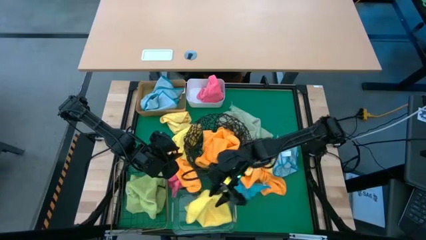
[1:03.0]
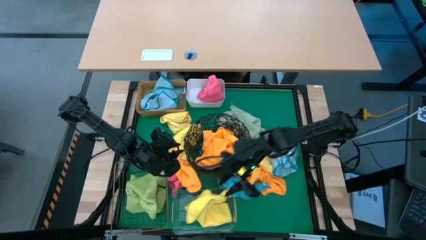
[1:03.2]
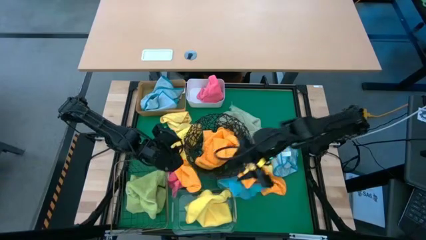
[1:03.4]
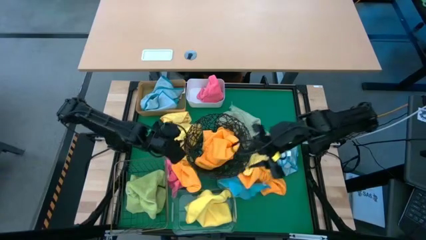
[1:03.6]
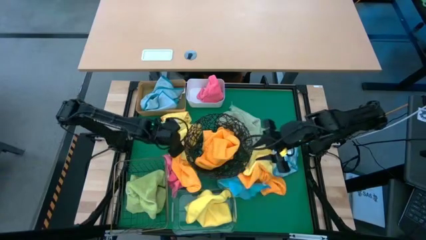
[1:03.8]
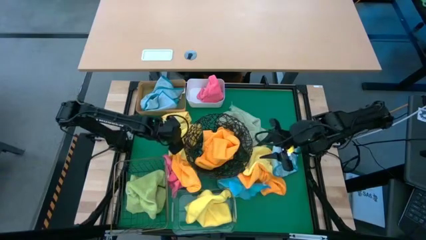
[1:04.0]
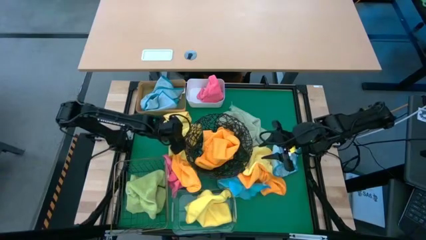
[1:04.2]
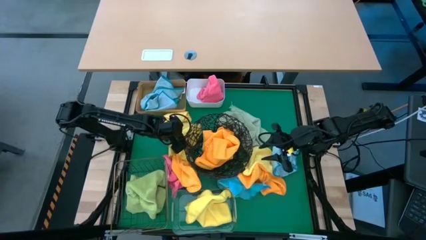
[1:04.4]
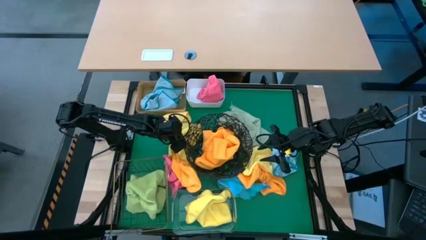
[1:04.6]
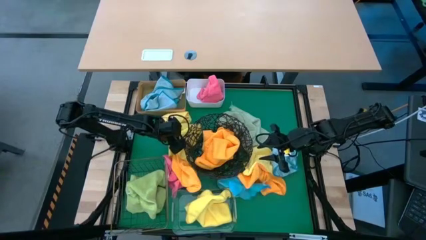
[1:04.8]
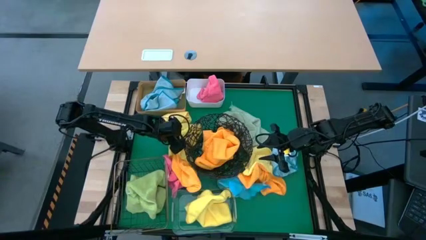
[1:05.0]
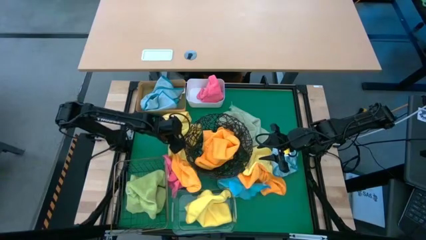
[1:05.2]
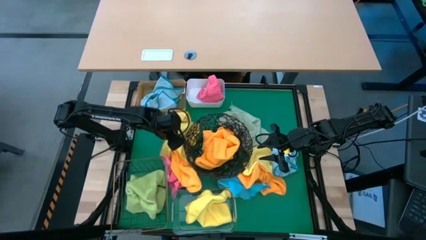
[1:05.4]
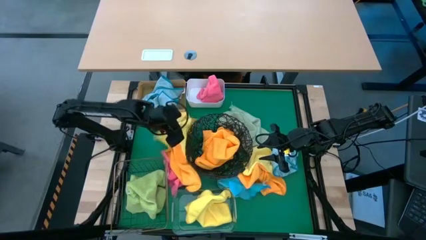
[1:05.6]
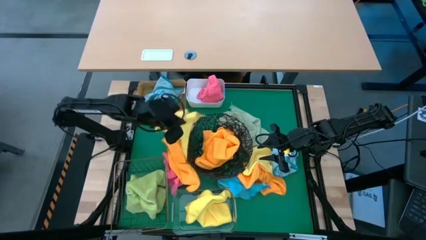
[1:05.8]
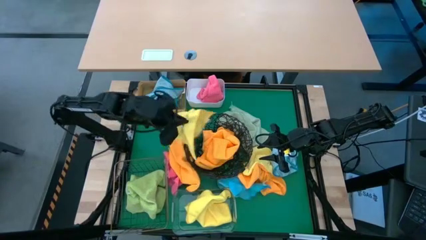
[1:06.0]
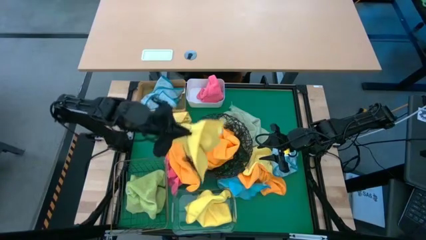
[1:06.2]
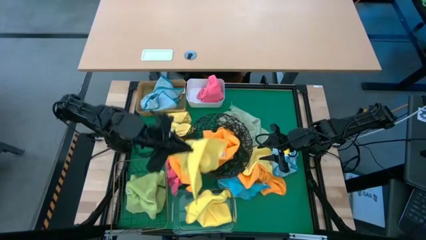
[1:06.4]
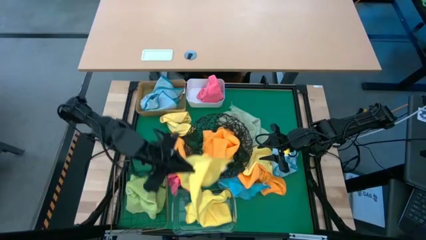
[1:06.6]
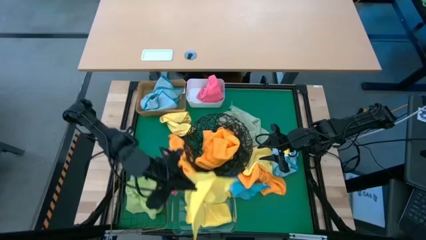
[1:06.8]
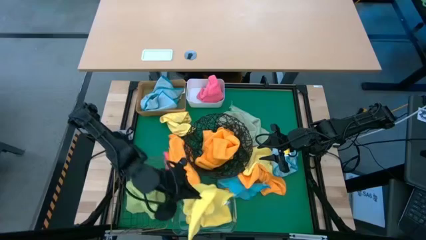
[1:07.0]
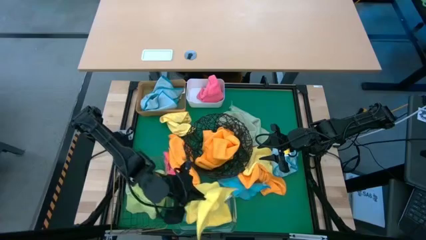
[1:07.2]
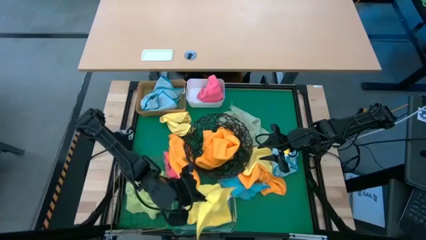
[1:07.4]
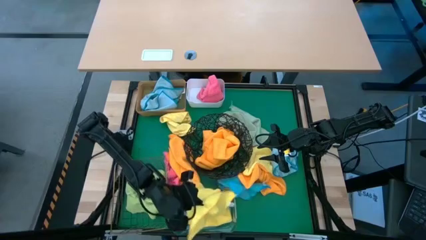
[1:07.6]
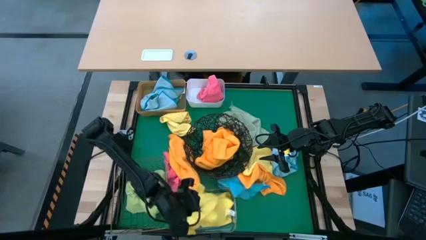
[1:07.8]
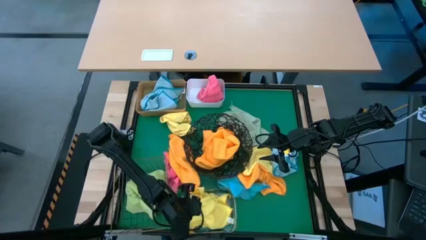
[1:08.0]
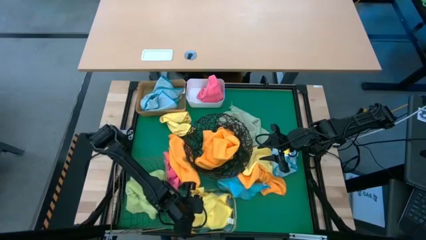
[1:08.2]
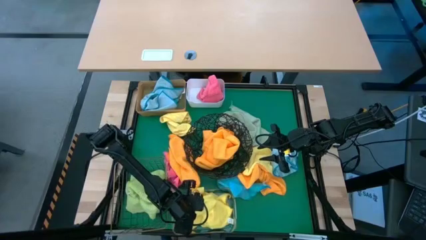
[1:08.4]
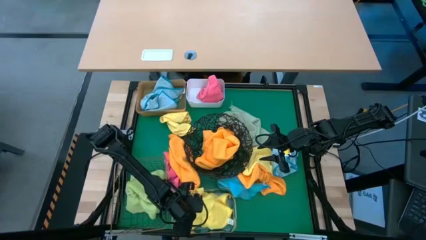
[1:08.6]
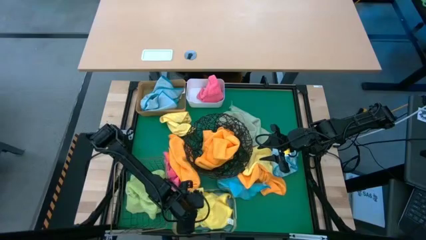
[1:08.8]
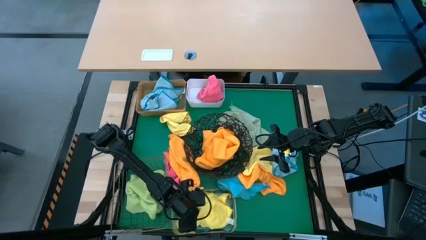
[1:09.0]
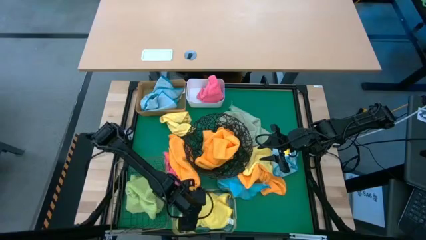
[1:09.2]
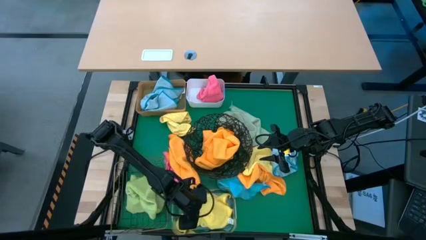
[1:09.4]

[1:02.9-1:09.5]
Task: Sort microfiber towel by color & place in baskets
Put the yellow towel into the transparent bin

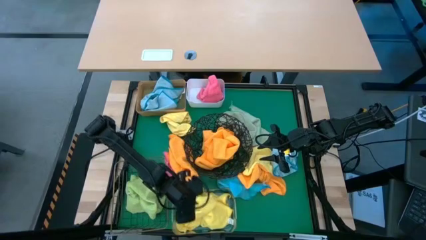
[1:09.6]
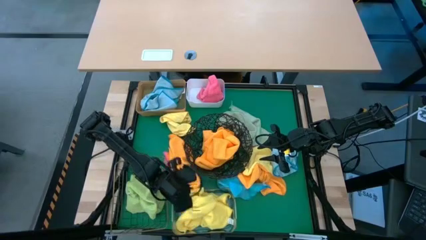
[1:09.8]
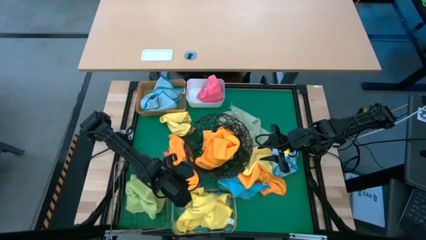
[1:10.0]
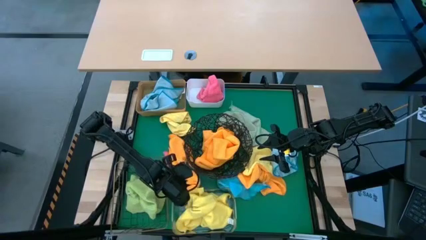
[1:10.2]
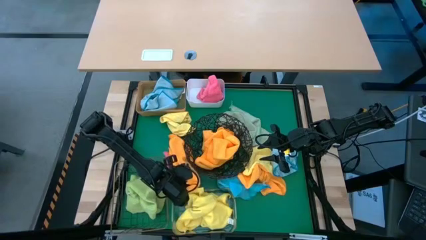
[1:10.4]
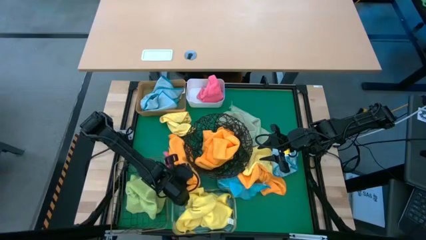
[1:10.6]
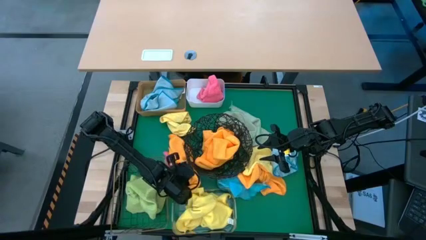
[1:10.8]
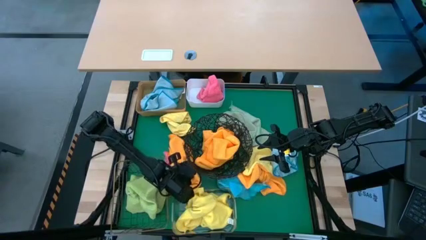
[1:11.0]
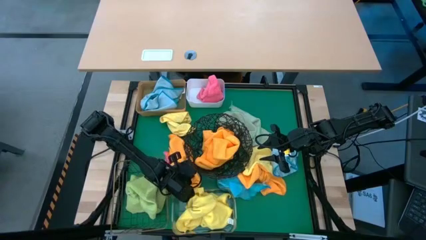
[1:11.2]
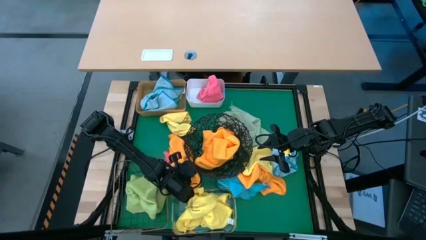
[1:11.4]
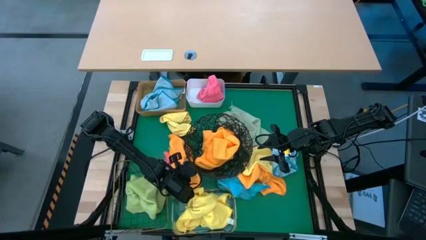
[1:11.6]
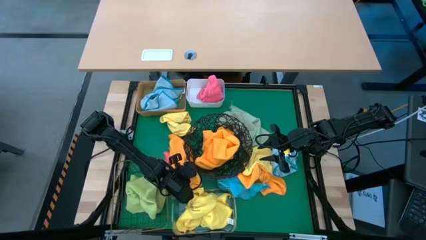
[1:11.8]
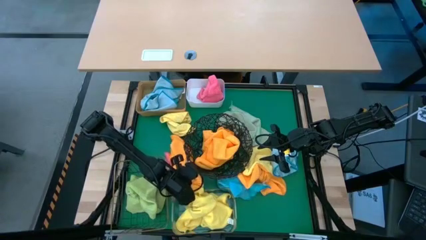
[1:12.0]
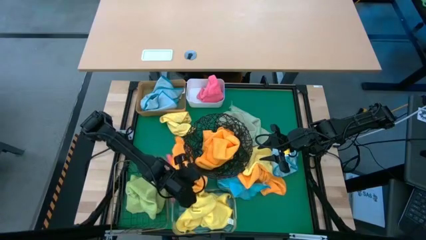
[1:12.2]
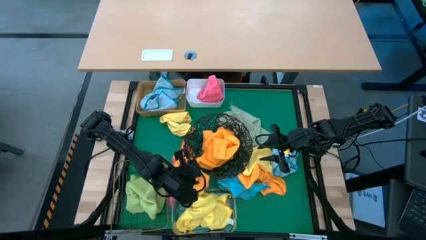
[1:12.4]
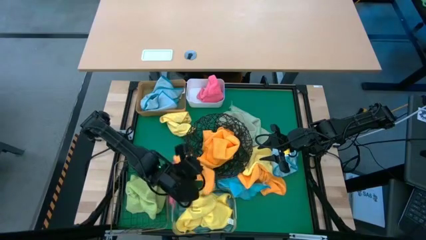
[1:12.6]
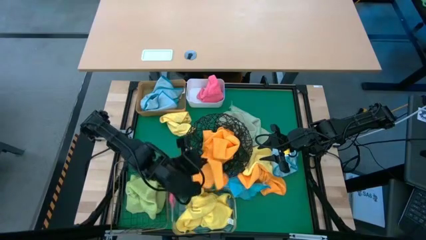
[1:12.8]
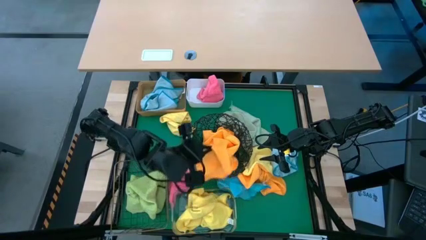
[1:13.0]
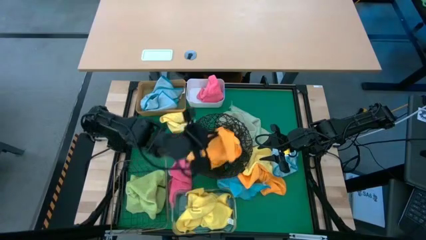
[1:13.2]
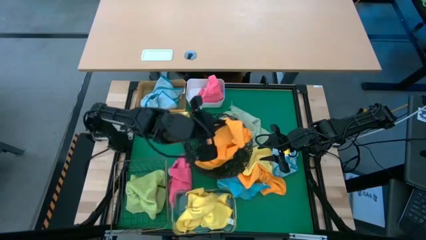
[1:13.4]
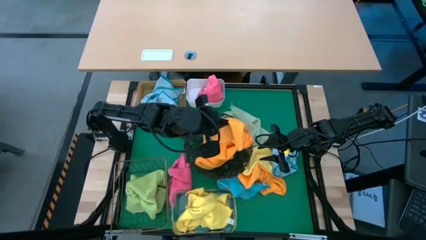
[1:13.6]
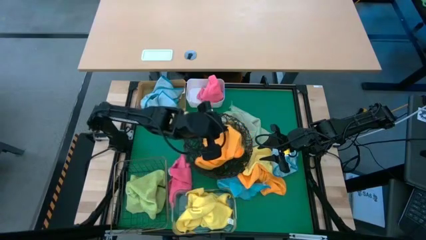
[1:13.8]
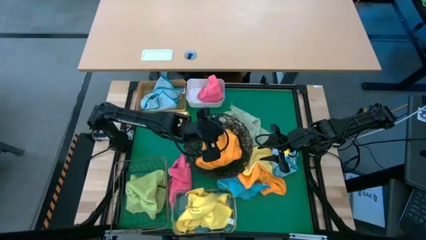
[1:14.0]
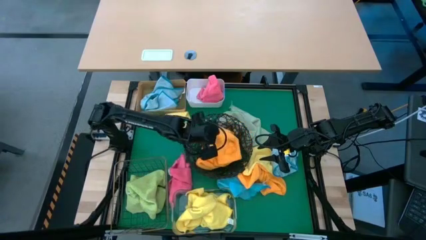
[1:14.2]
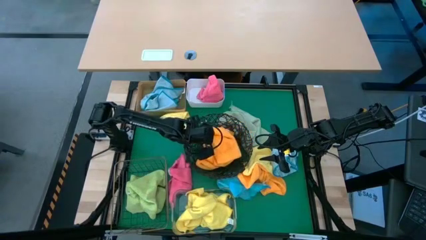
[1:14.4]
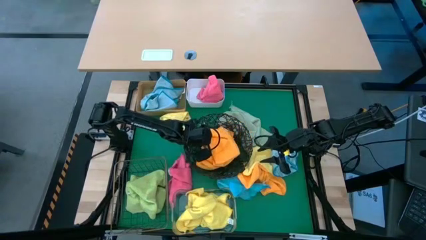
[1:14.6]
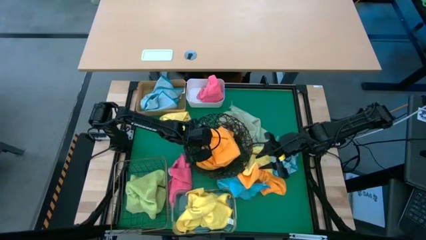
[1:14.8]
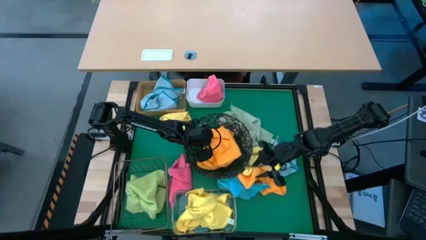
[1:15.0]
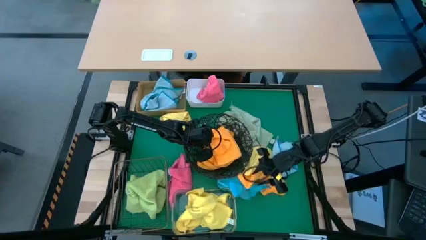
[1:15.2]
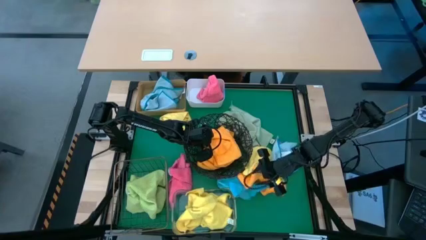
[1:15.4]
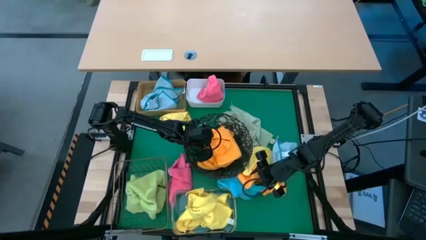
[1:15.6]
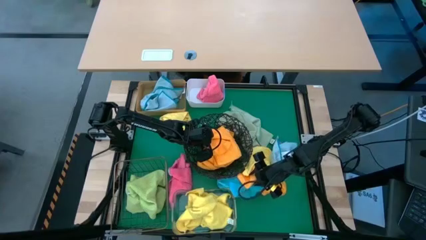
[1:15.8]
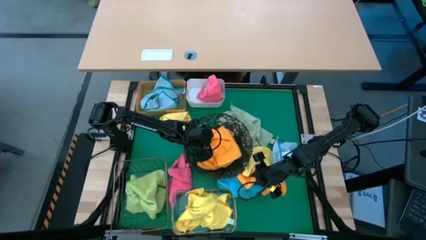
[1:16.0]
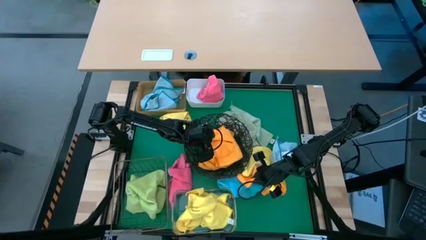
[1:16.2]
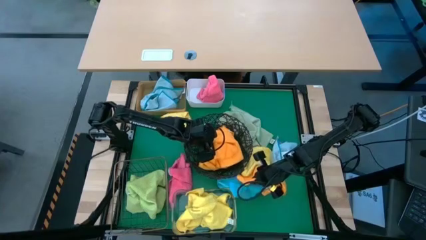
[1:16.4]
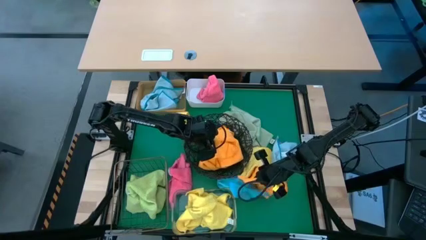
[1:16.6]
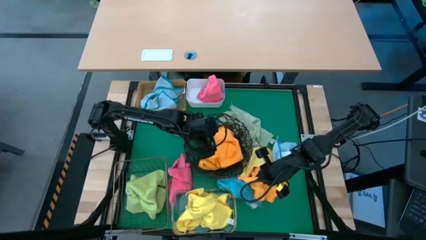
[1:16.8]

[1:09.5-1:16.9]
Put the orange towel into the black wire basket

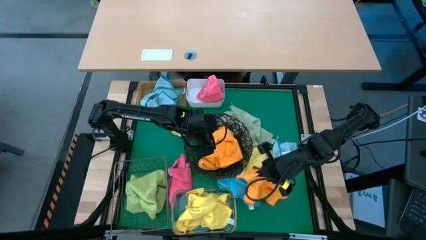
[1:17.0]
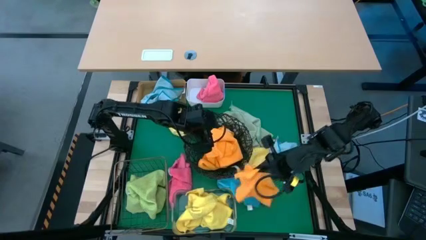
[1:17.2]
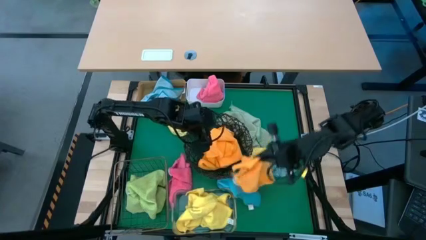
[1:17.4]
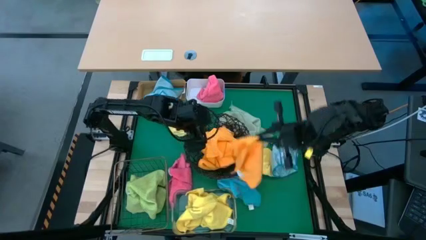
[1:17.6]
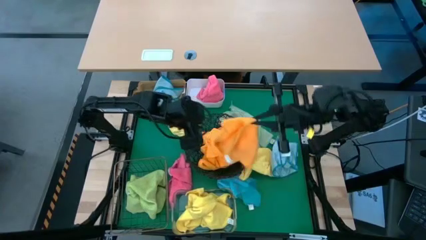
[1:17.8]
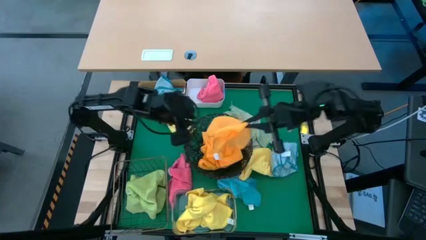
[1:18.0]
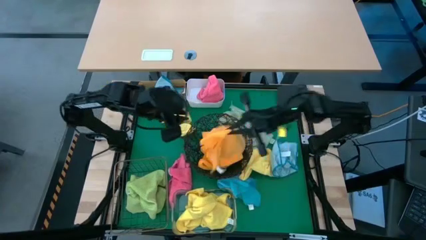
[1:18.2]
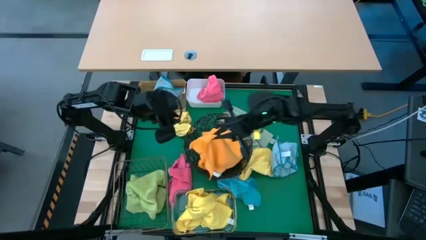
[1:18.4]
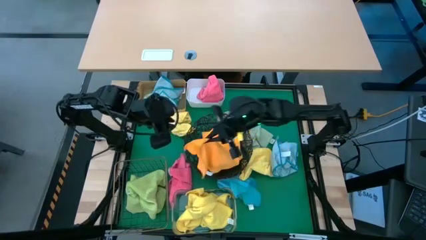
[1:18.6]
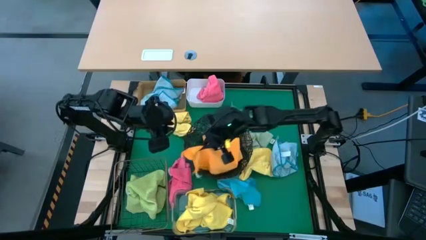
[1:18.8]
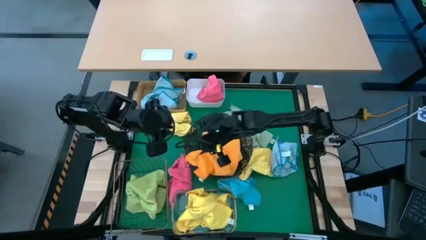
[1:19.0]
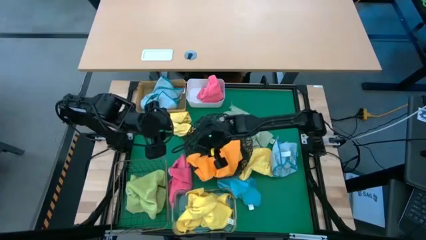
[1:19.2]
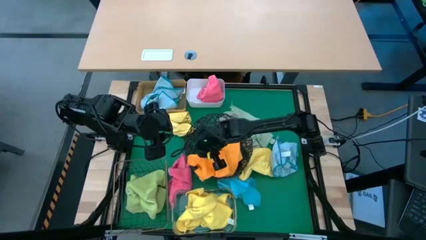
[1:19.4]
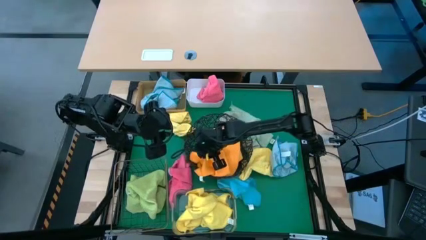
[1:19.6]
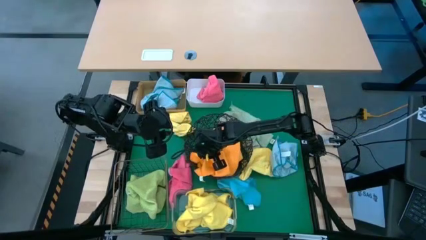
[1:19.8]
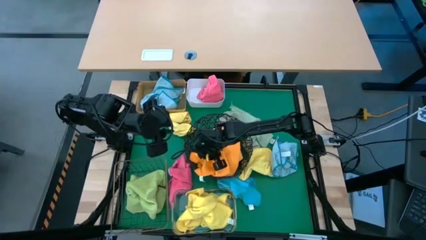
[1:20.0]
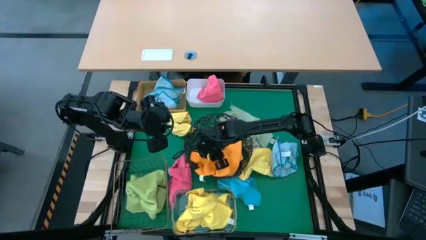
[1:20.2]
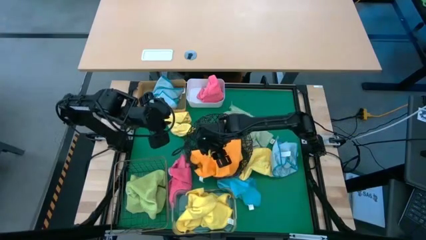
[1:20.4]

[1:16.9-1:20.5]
Put the orange towel into the black wire basket
